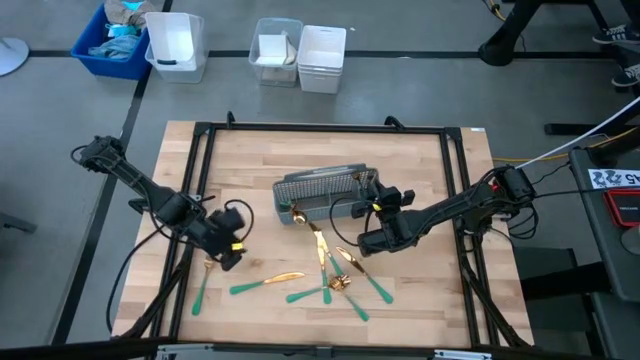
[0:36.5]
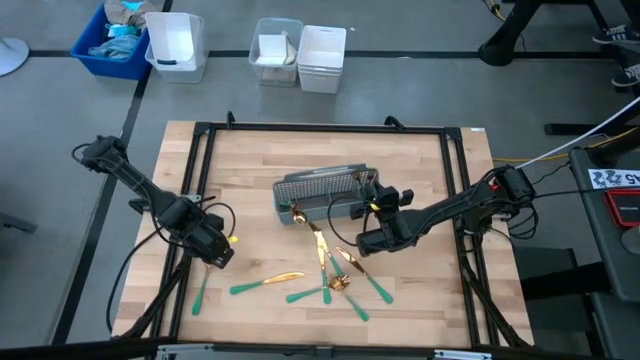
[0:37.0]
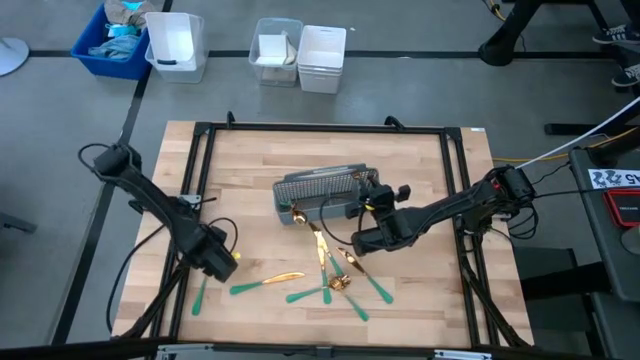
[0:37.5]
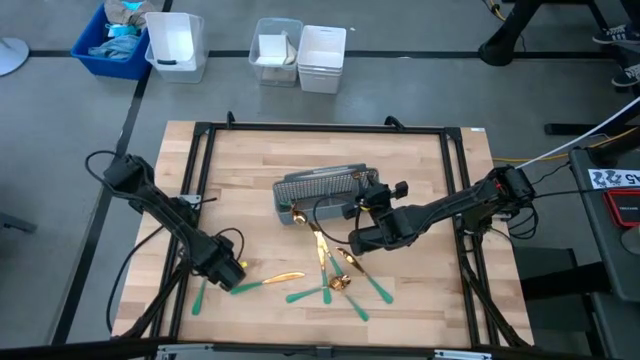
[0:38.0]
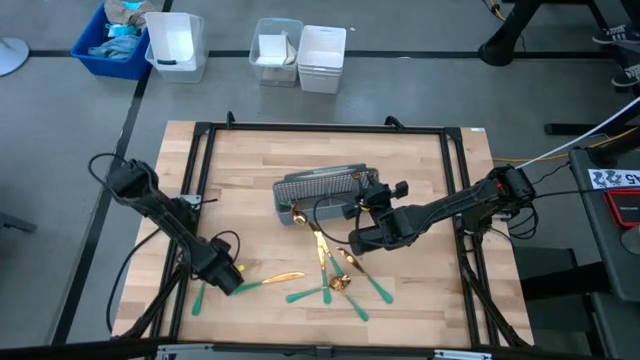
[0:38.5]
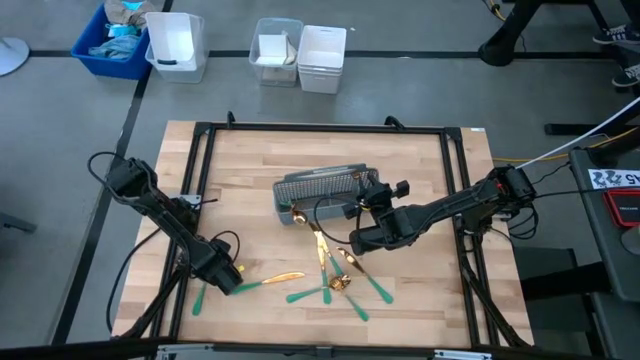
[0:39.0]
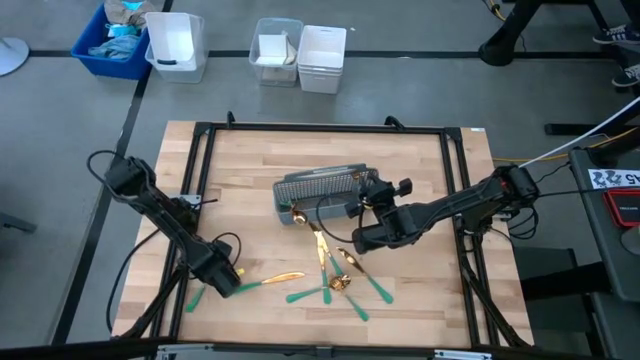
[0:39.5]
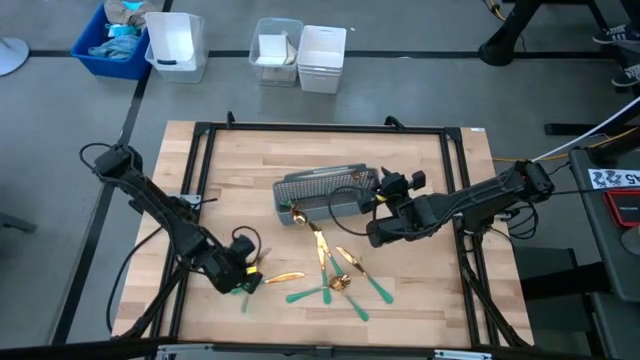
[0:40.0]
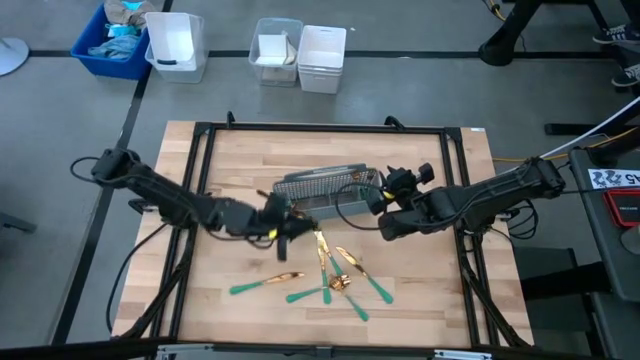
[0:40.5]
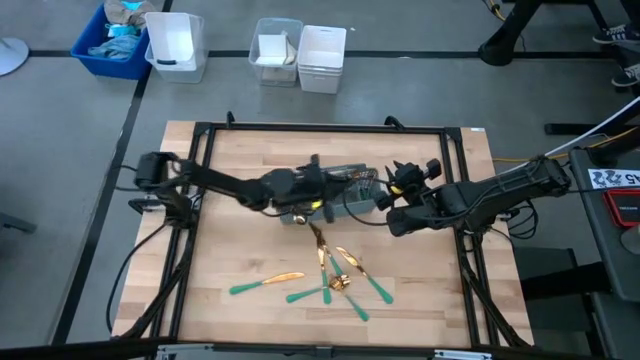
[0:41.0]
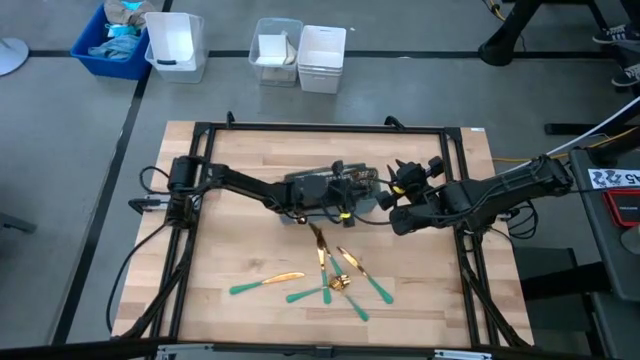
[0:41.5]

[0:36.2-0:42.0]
Task: Sort silverware
Put the green fork in the gray silverware basket

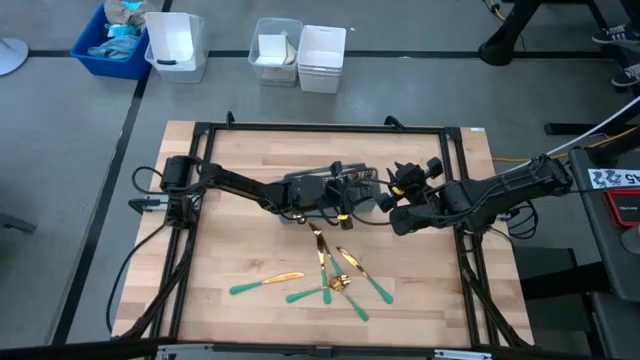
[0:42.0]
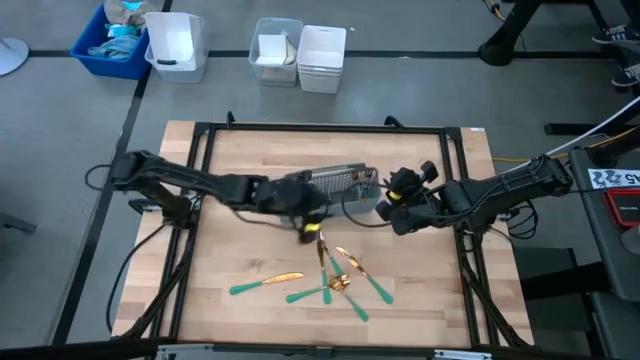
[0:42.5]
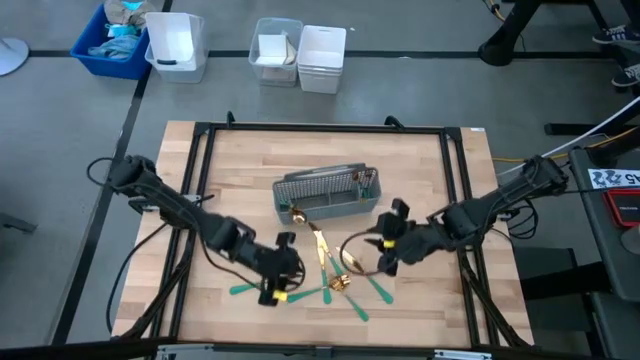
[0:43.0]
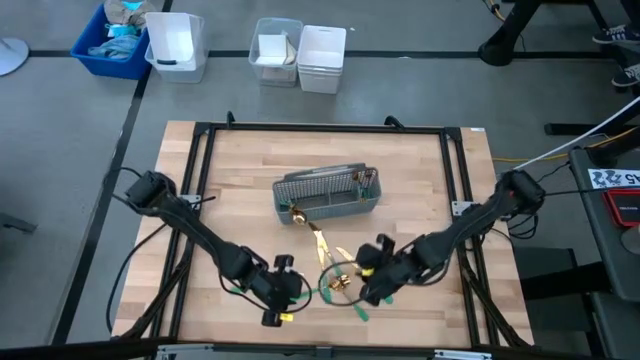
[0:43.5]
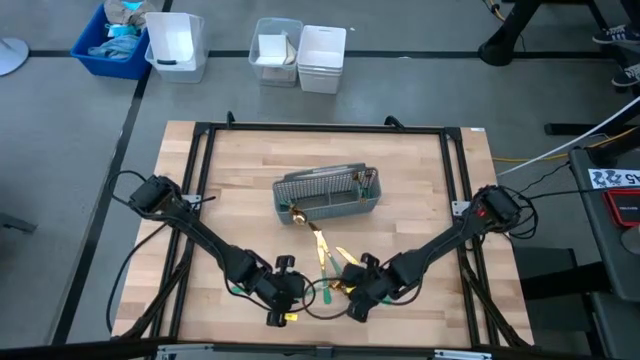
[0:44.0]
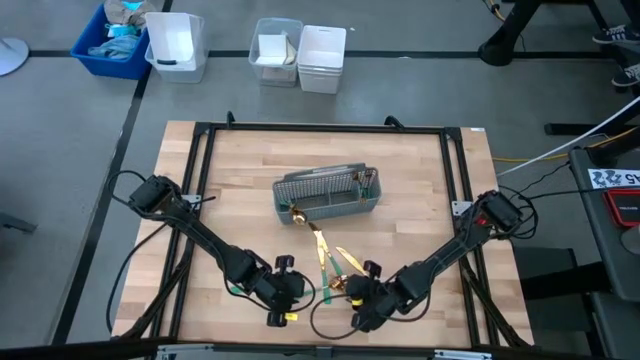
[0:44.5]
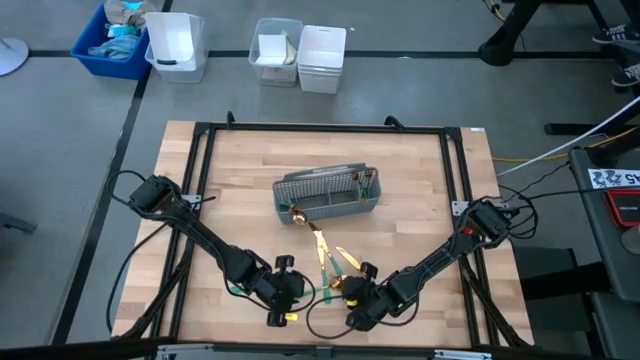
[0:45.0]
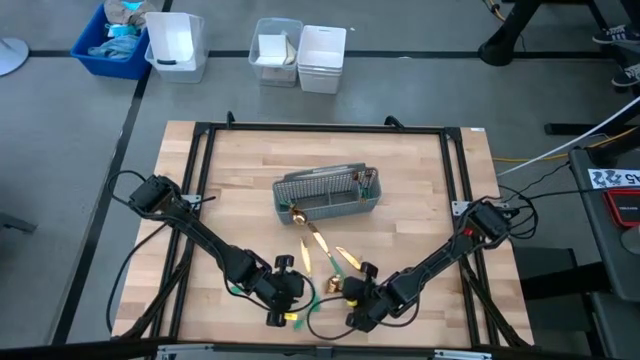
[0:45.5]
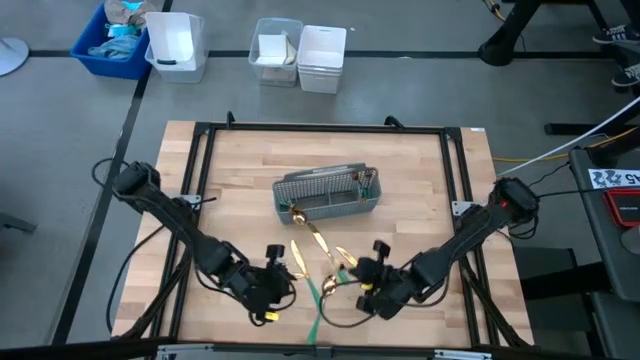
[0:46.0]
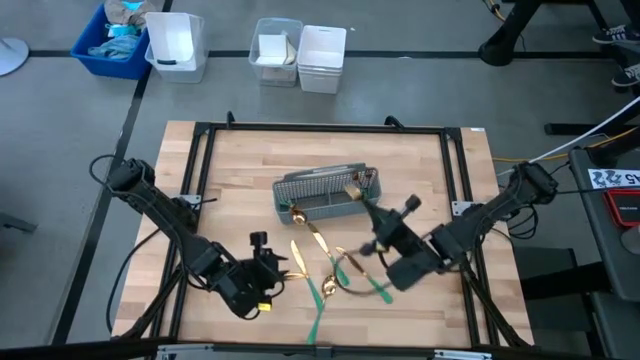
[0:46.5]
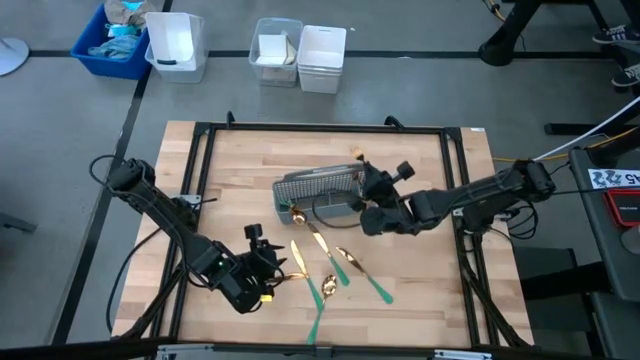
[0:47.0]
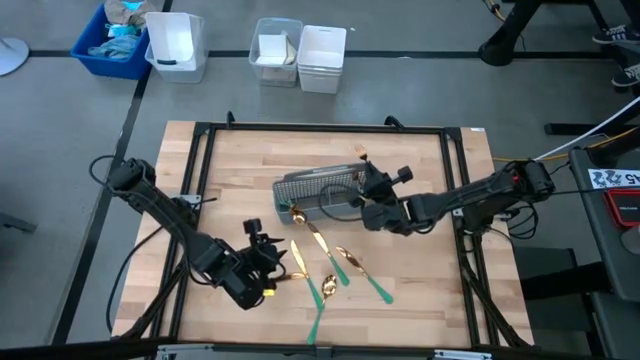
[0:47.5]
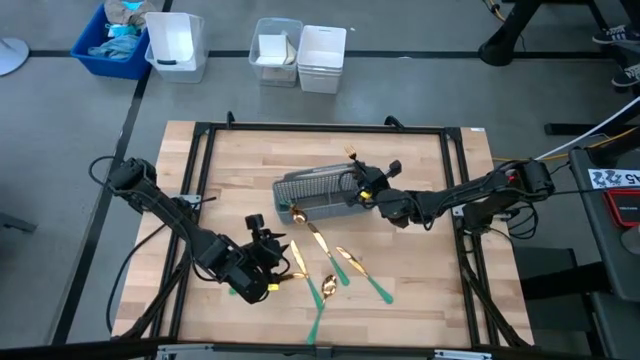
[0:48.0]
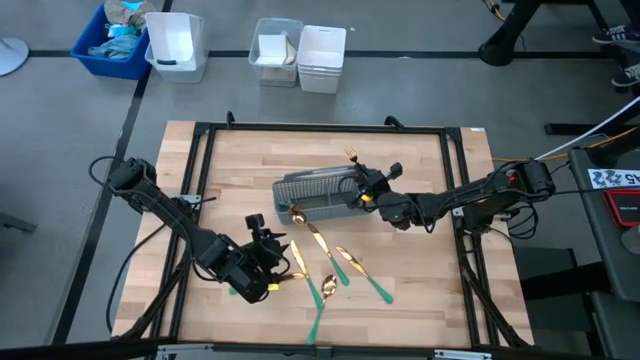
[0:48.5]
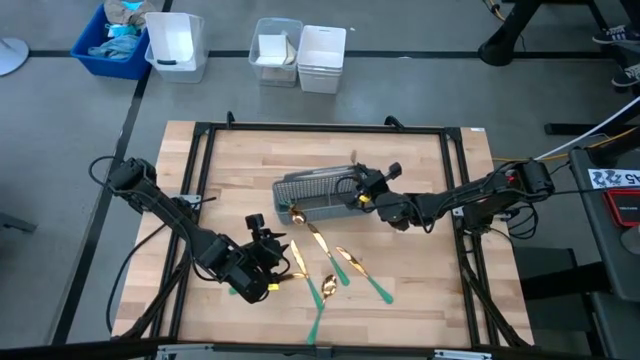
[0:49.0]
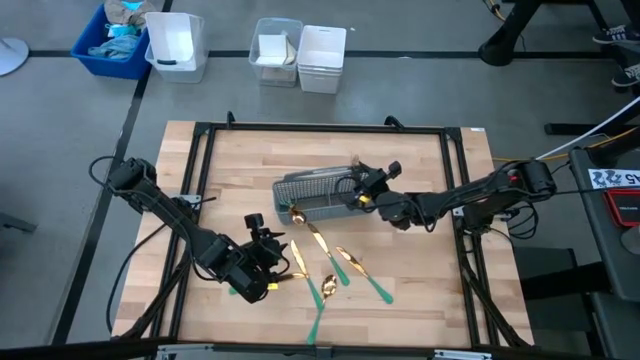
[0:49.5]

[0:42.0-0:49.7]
Put the green fork in the gray silverware basket

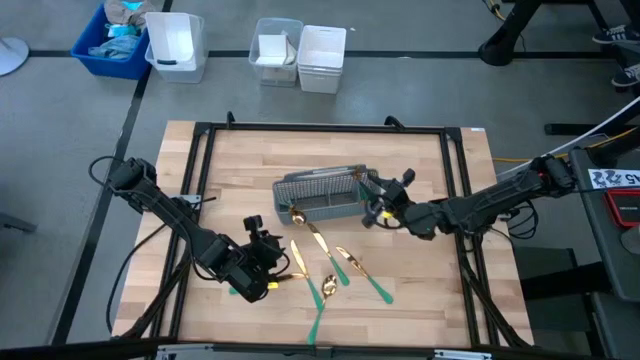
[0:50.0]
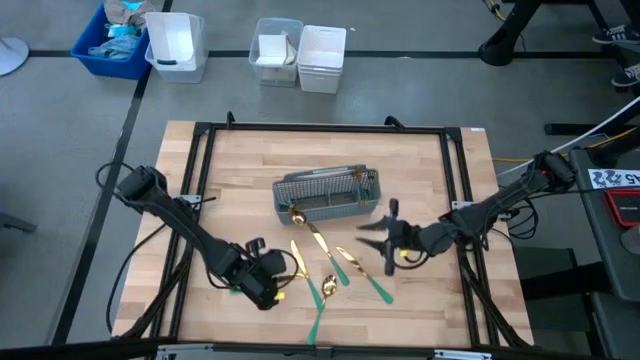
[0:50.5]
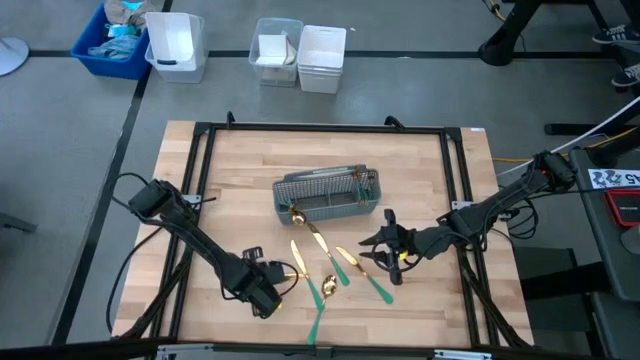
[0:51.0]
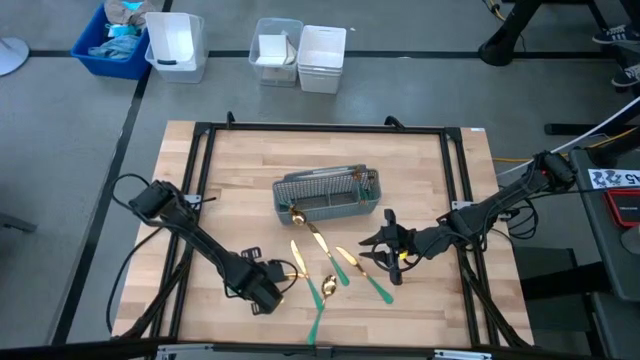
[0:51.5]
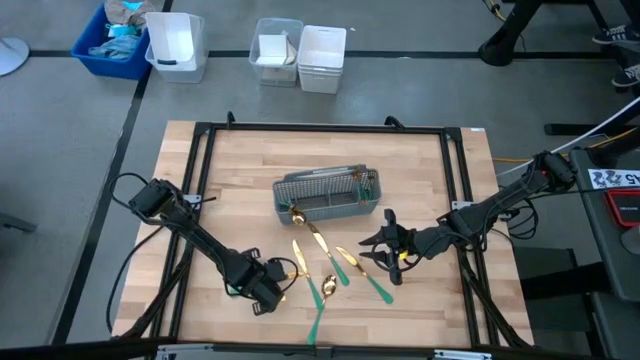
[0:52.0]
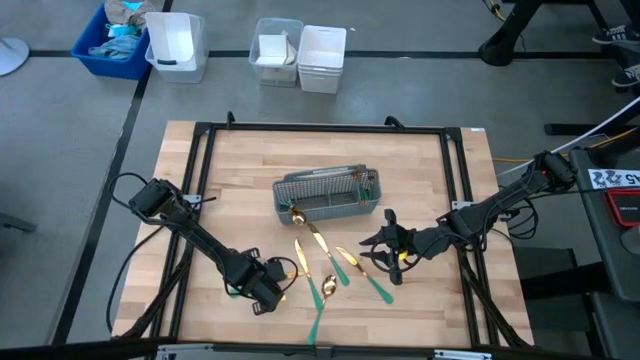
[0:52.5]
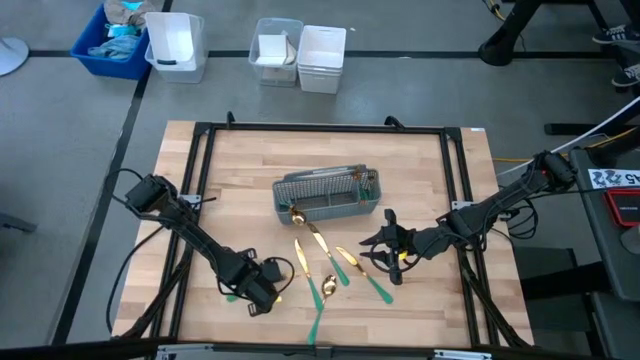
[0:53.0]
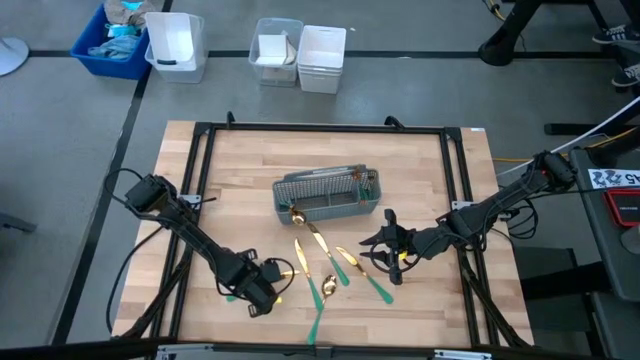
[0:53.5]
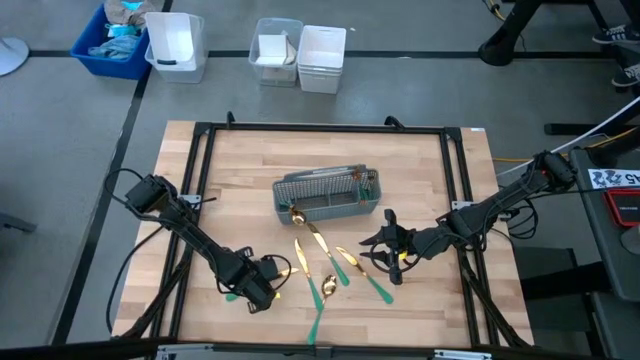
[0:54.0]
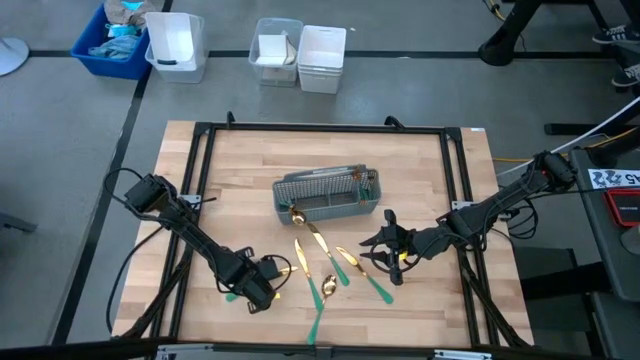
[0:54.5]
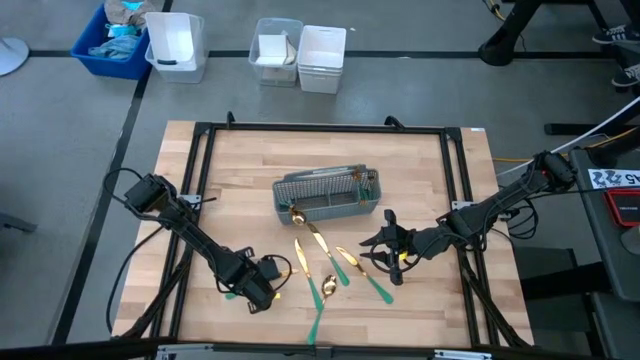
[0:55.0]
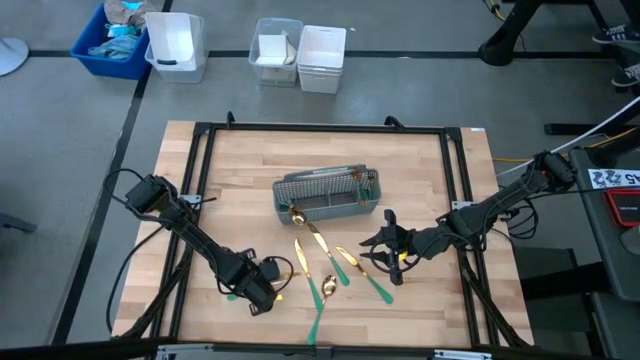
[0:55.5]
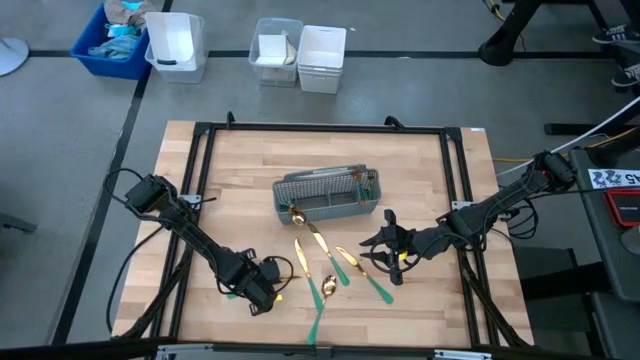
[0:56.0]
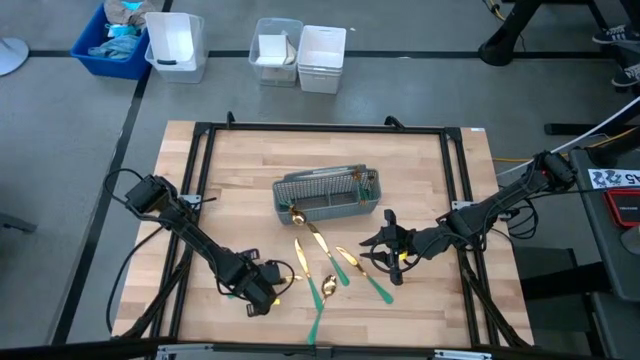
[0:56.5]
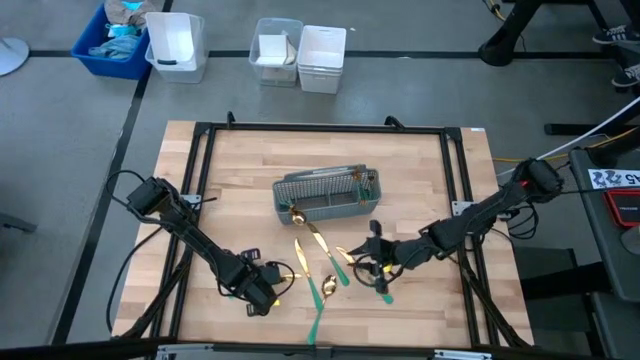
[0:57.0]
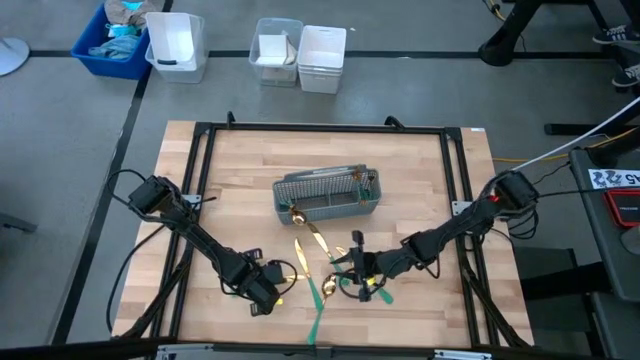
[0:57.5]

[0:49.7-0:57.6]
Put the green knife in the gray silverware basket

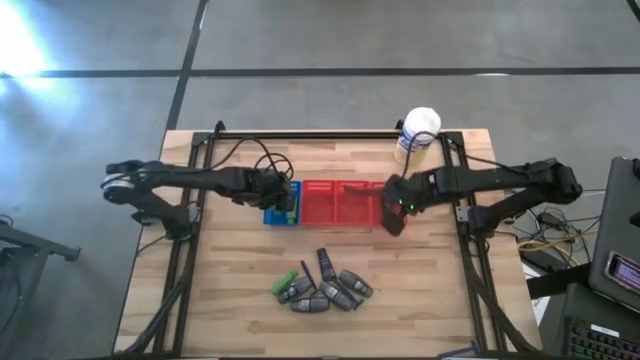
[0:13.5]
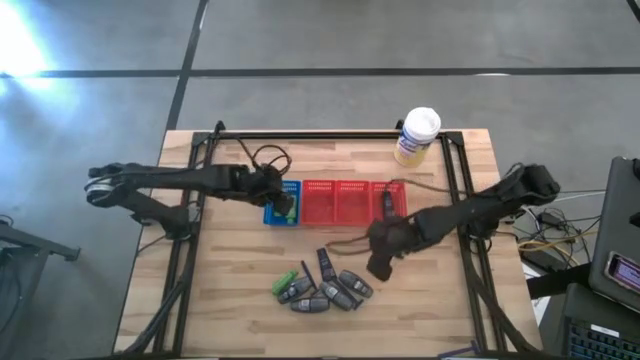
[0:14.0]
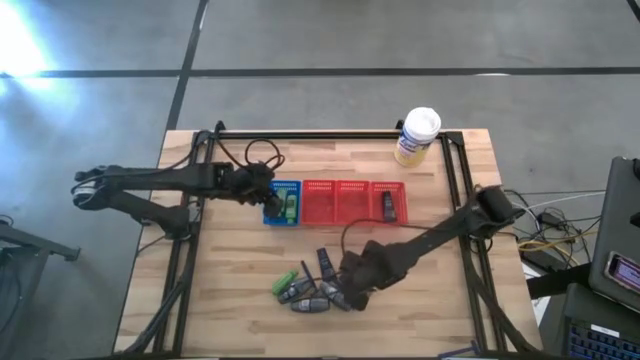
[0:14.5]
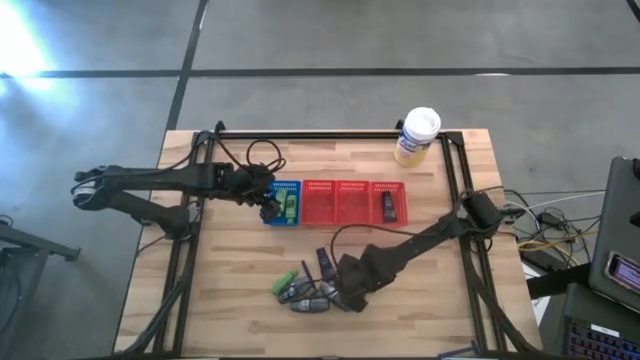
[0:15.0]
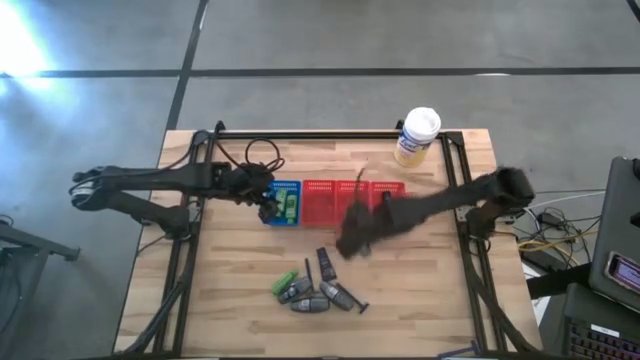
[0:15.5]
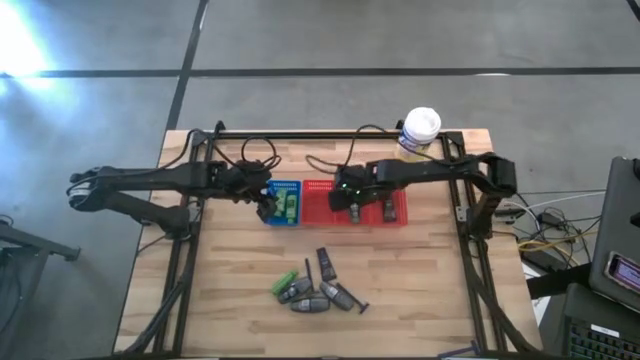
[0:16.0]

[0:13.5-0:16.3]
Task: Pick & Place Travel size toiletries
Put the gray deodorant into the middle red bin
